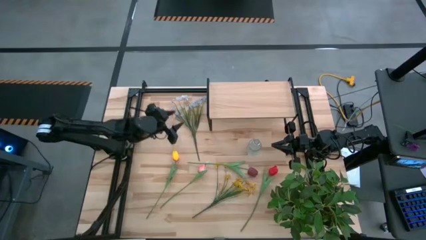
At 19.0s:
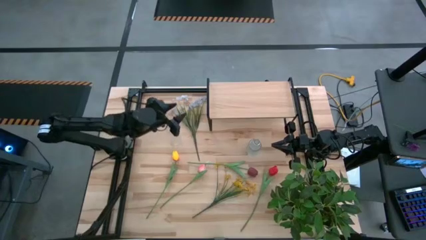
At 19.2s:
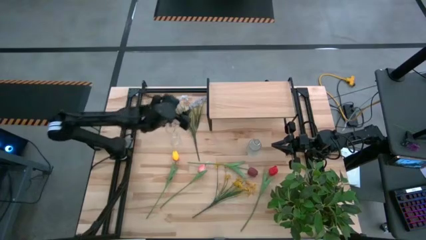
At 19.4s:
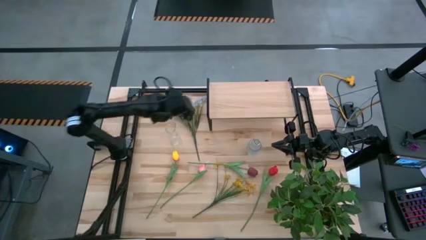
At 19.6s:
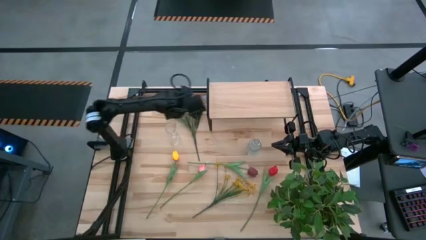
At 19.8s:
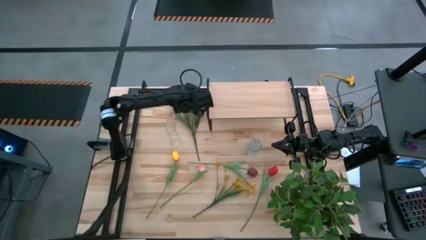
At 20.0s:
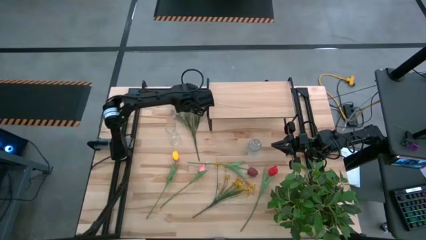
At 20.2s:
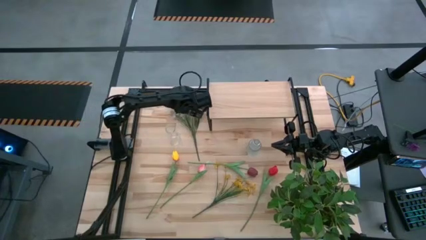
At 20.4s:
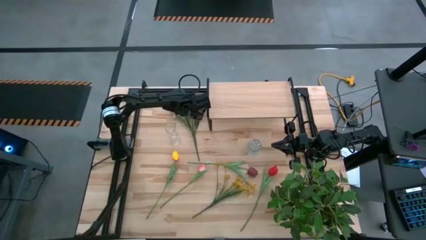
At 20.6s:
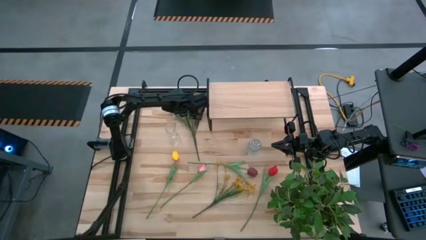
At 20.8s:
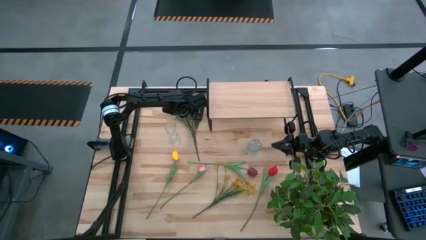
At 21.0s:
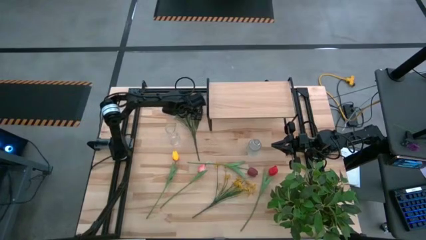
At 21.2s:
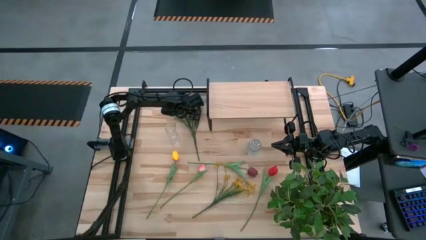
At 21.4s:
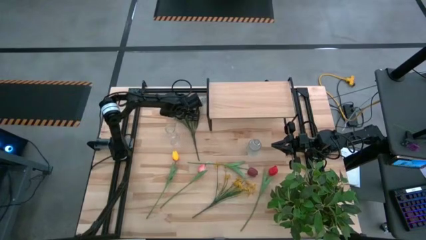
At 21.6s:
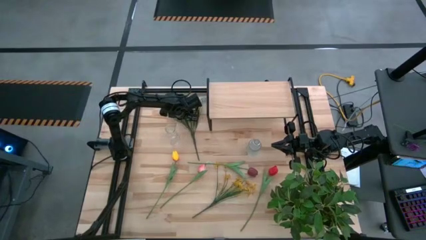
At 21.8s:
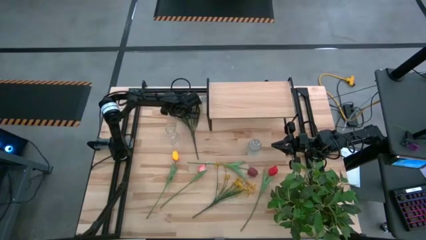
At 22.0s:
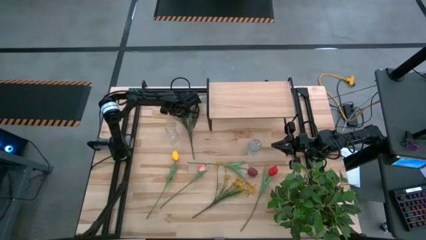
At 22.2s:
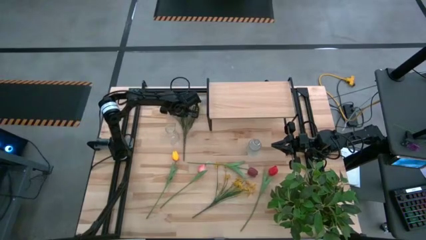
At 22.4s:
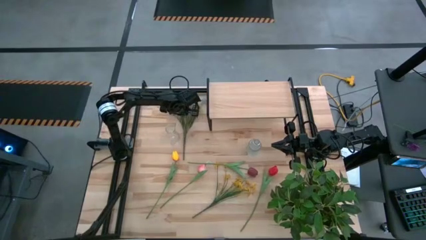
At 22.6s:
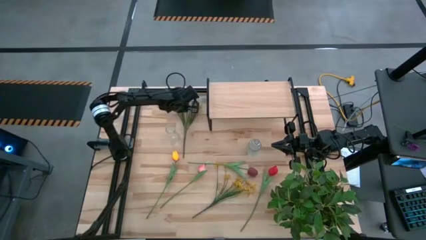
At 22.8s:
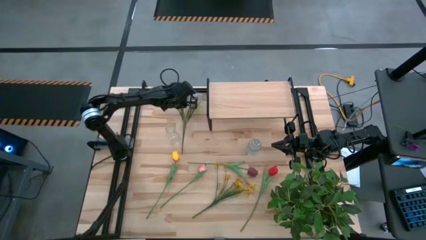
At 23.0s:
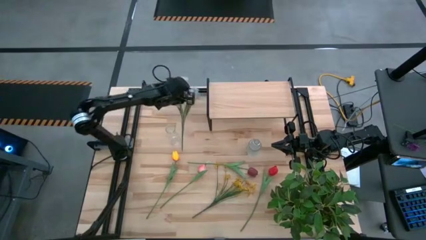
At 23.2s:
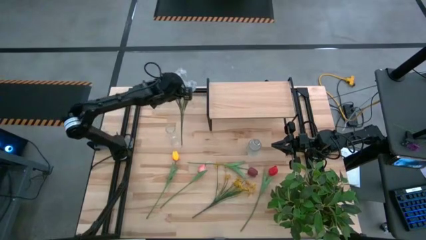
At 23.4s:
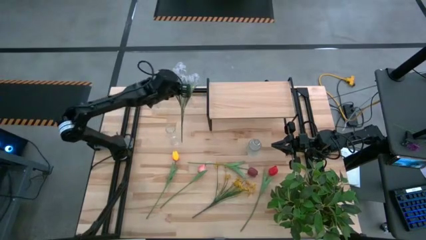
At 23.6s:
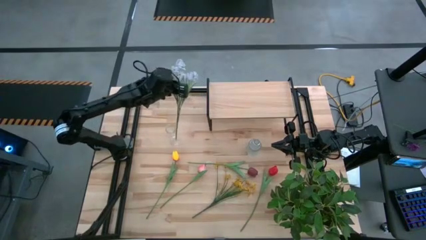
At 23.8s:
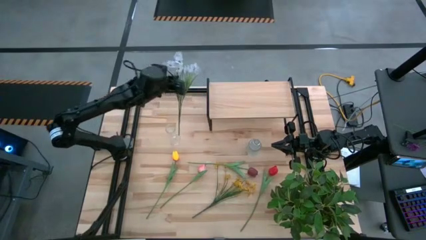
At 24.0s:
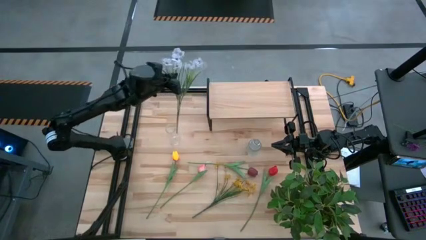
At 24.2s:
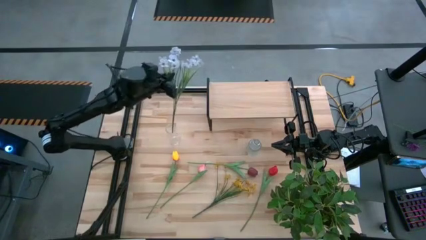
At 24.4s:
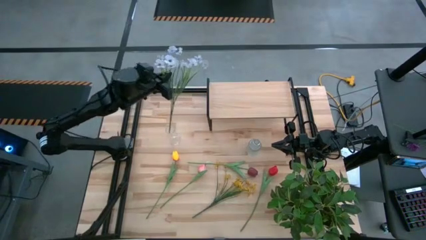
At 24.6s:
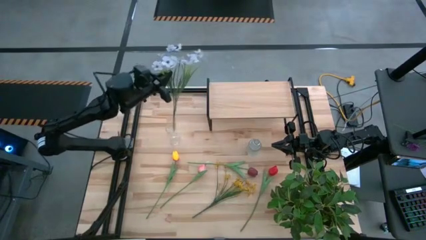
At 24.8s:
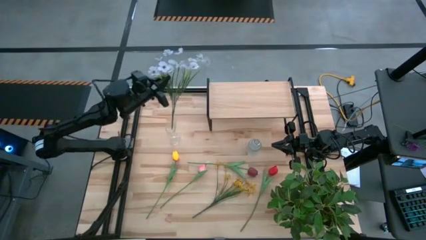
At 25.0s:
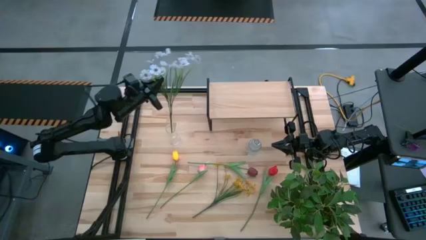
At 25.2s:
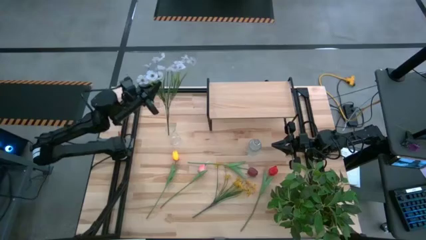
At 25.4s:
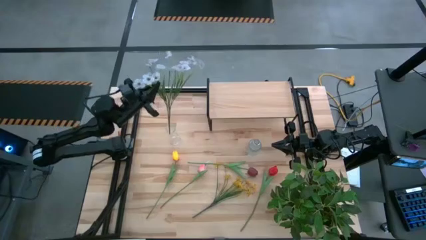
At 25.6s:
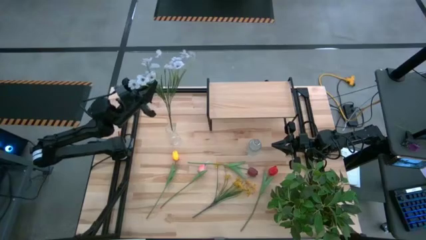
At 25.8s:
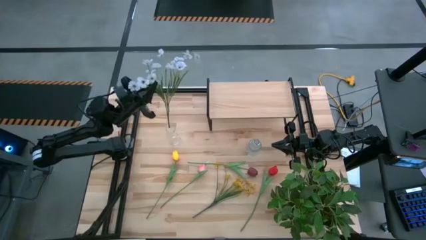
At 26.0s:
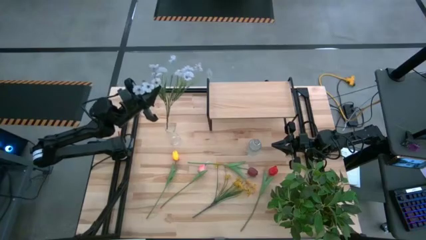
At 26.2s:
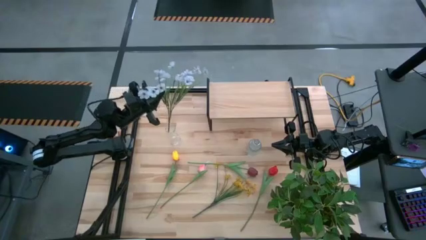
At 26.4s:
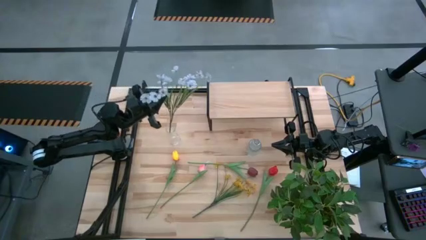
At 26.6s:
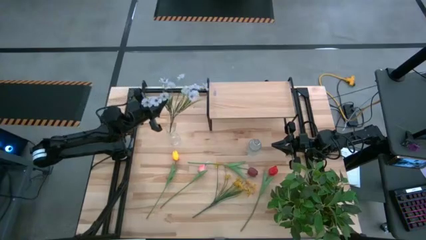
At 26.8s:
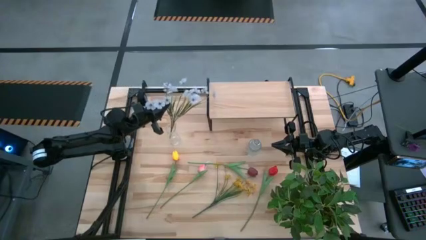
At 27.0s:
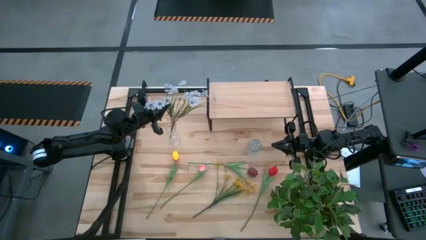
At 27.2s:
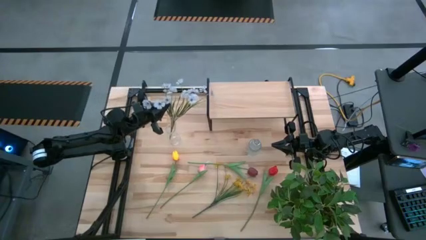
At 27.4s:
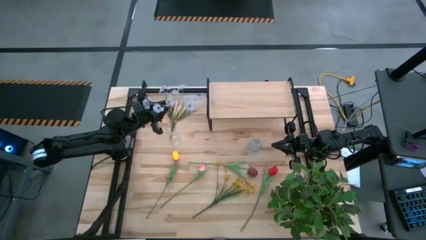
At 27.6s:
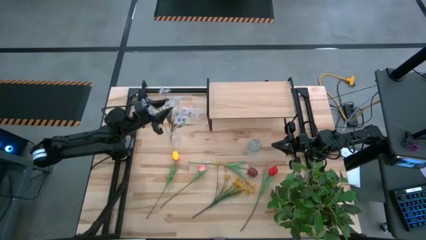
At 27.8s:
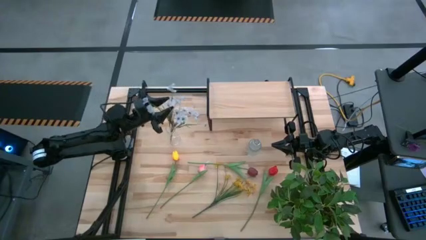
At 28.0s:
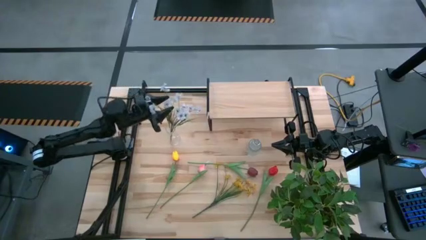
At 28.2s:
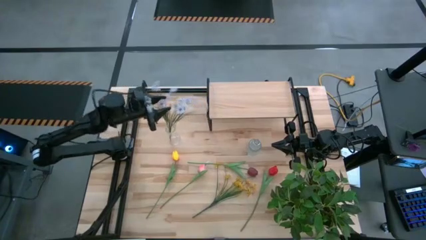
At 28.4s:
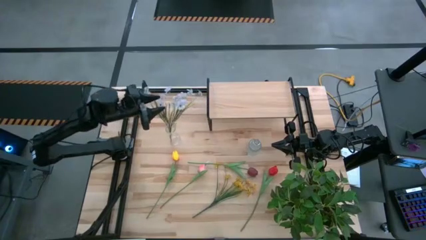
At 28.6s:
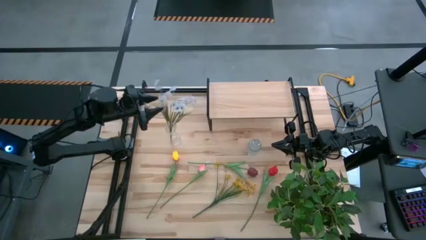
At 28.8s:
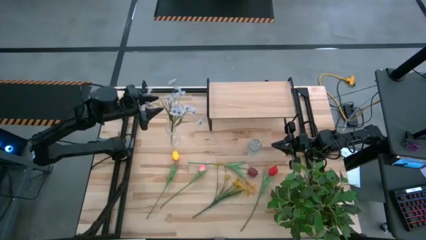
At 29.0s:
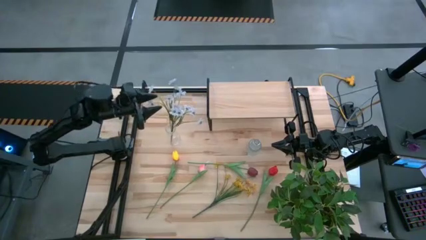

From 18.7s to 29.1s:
Task: Pick and place flowers into a vace then onto a shelf
Put the white flowers into the left transparent vase

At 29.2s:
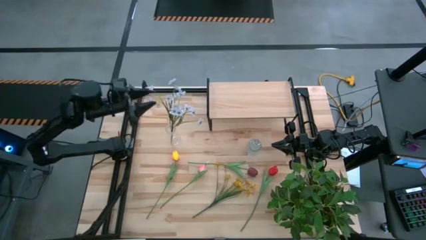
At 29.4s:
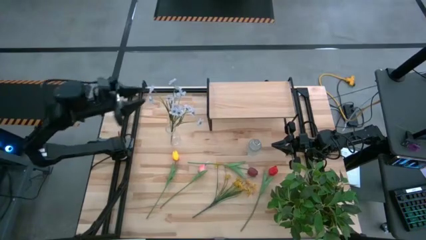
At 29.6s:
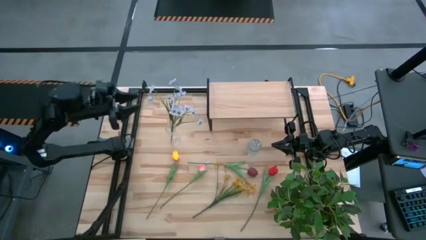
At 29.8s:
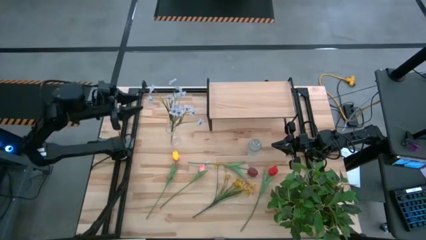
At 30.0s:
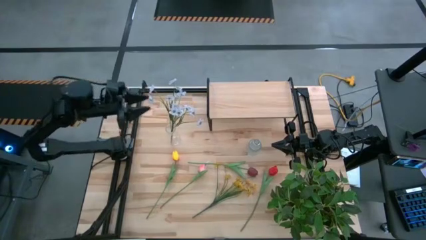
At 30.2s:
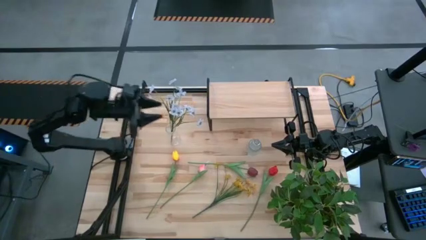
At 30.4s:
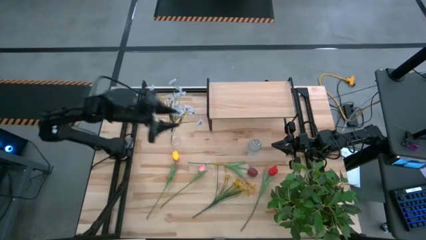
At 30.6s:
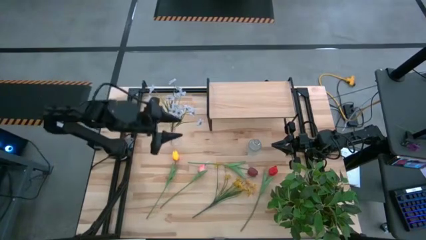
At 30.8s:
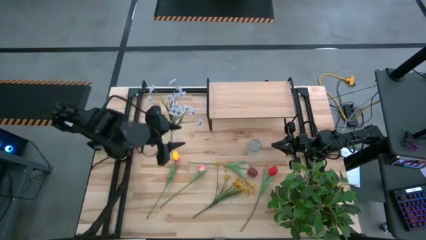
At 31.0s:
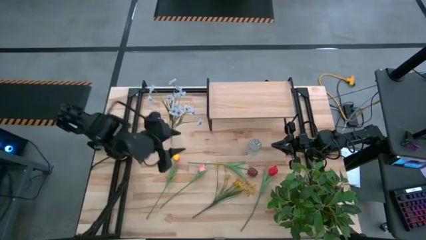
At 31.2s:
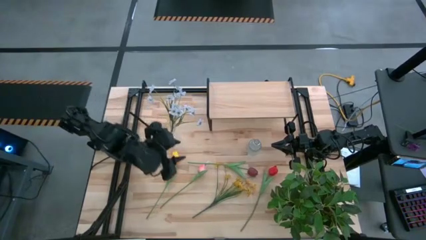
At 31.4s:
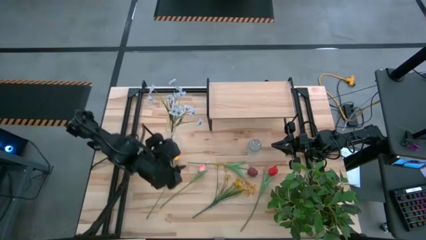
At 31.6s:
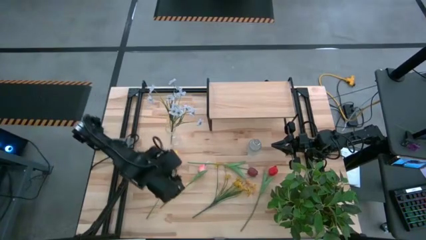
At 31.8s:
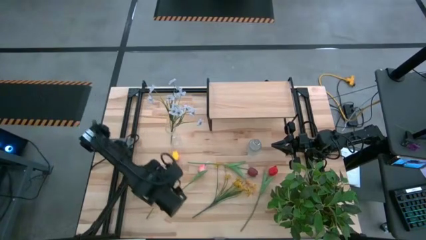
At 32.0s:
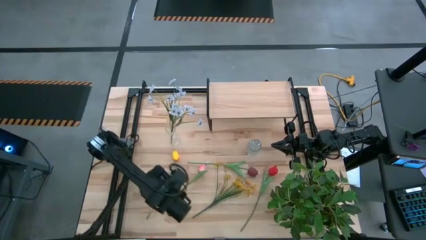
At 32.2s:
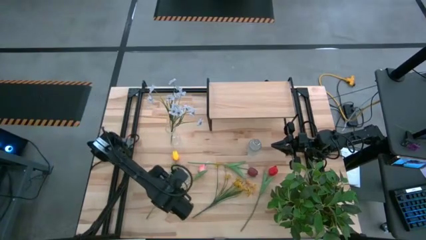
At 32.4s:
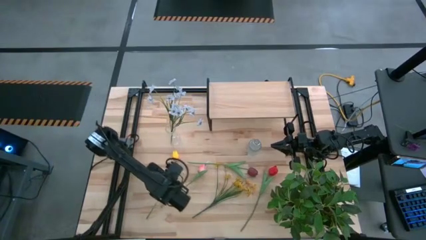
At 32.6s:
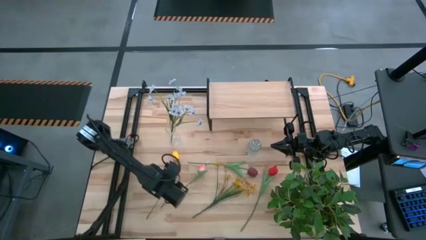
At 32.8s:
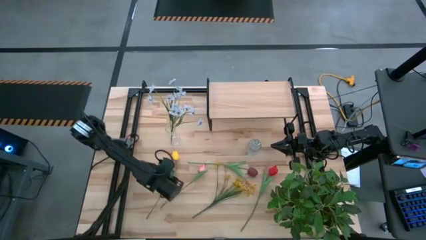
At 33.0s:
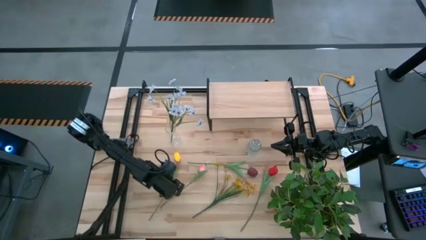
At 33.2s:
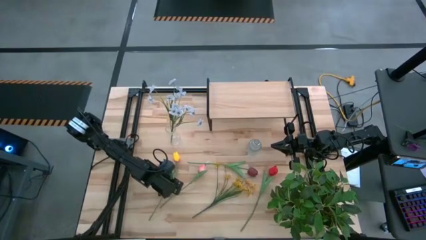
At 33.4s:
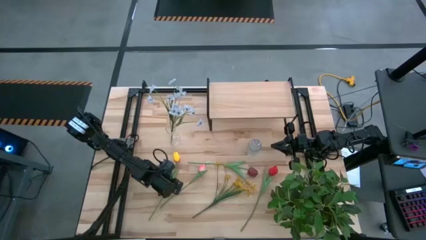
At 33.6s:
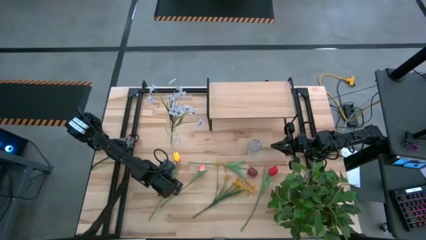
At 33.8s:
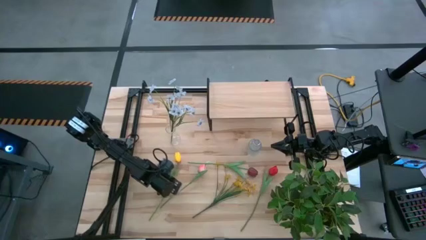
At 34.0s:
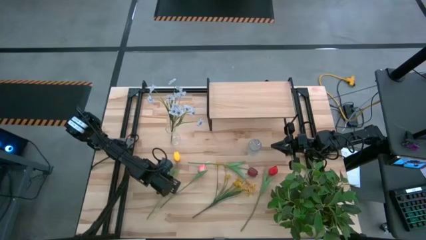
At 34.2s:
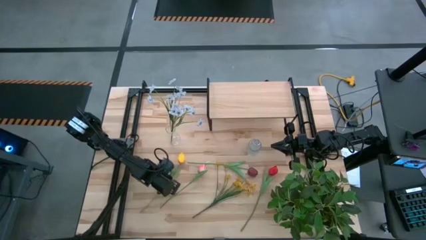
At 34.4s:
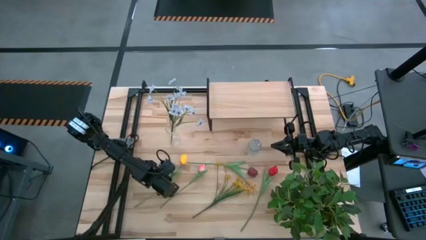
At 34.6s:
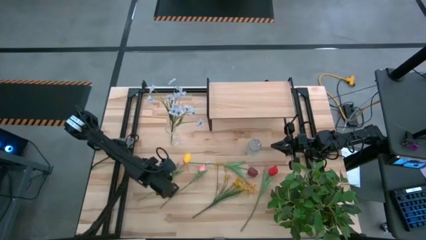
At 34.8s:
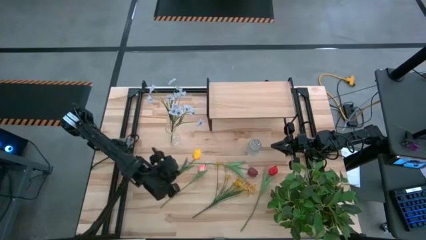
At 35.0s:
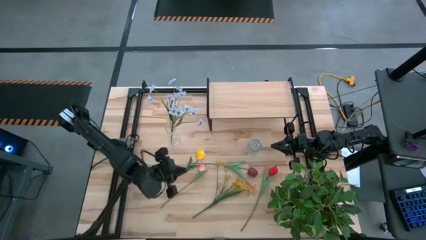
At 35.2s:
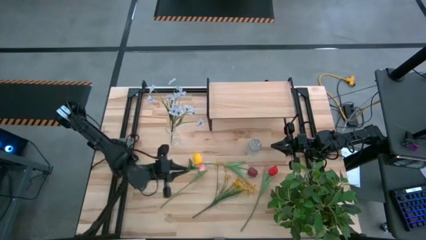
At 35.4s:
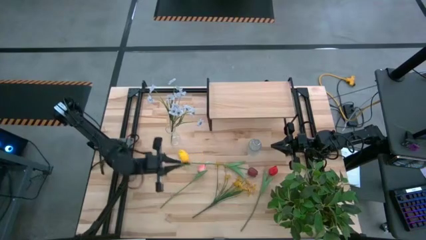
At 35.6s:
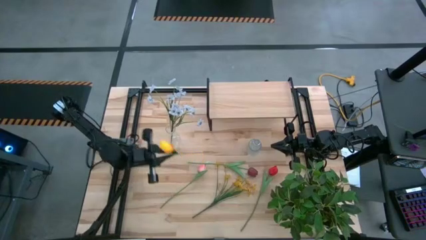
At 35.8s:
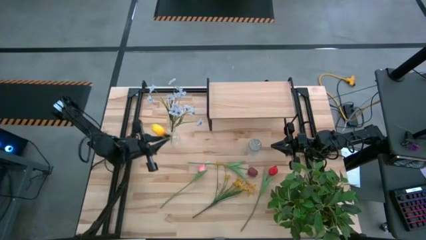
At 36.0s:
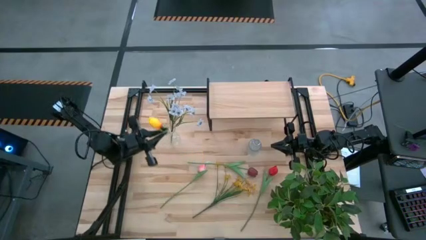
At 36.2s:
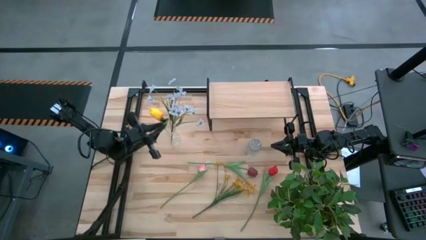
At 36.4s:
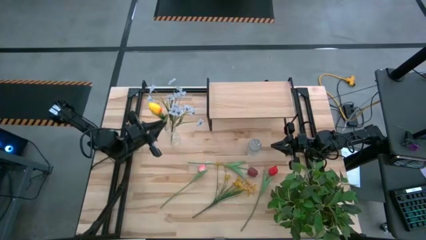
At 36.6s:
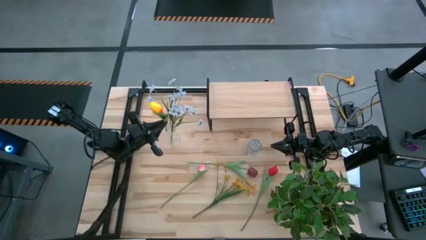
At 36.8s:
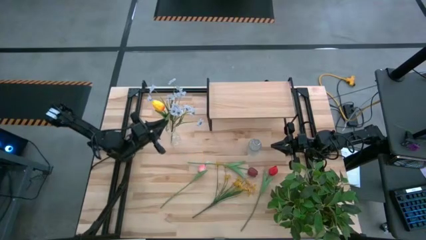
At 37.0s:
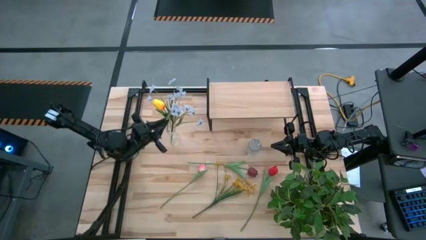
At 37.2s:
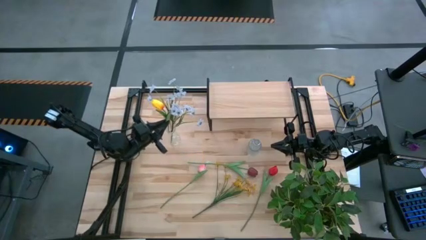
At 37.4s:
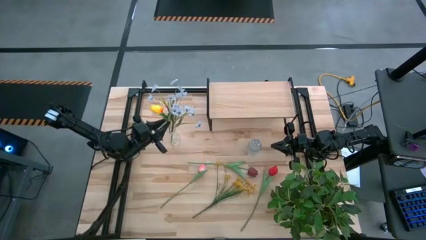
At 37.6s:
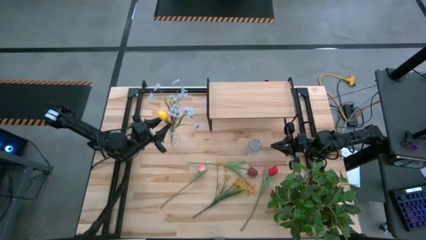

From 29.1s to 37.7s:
Put the yellow flower into the left transparent vase
